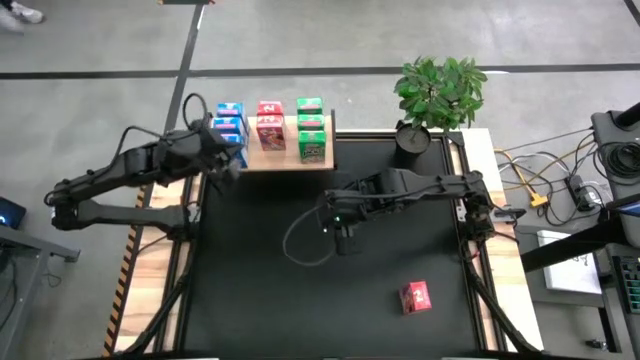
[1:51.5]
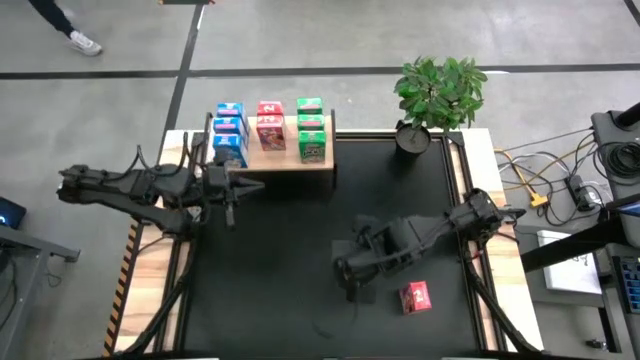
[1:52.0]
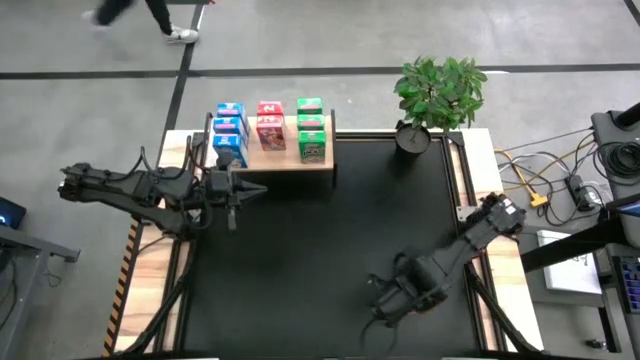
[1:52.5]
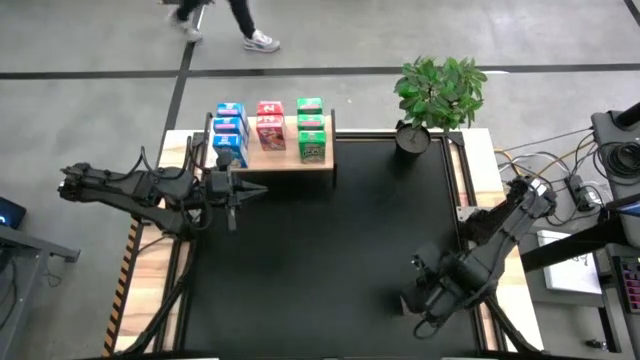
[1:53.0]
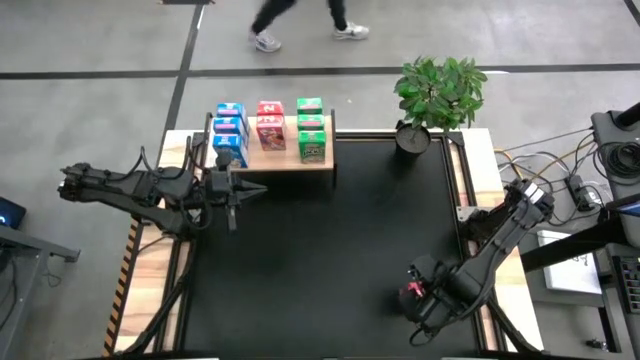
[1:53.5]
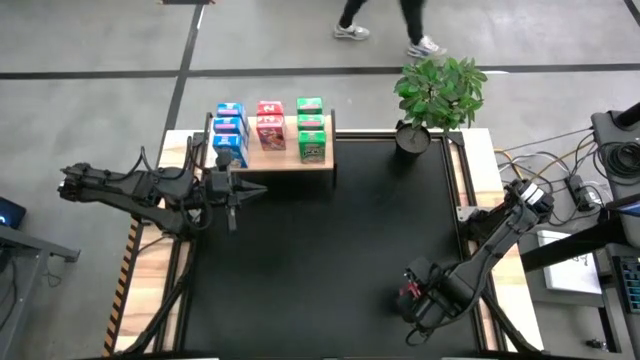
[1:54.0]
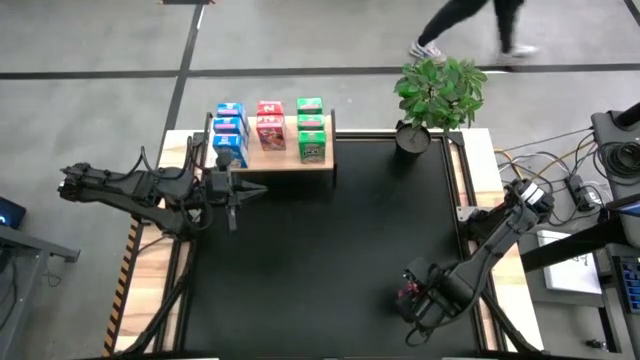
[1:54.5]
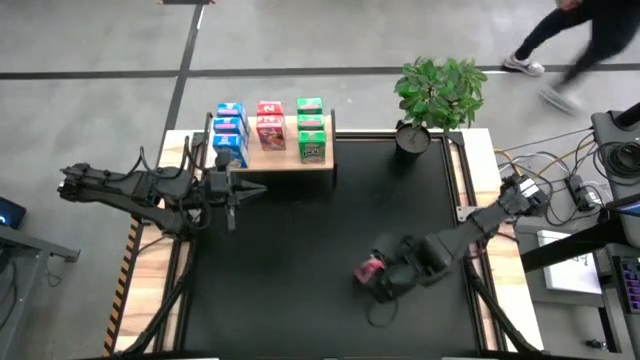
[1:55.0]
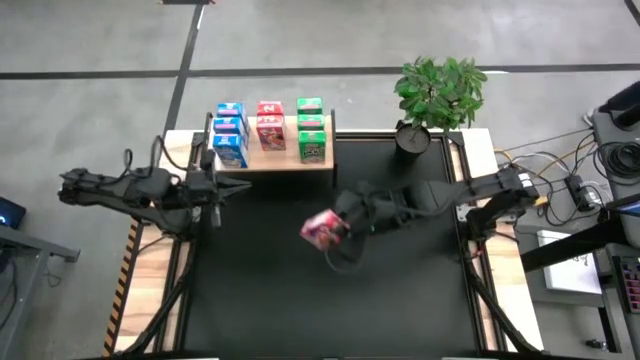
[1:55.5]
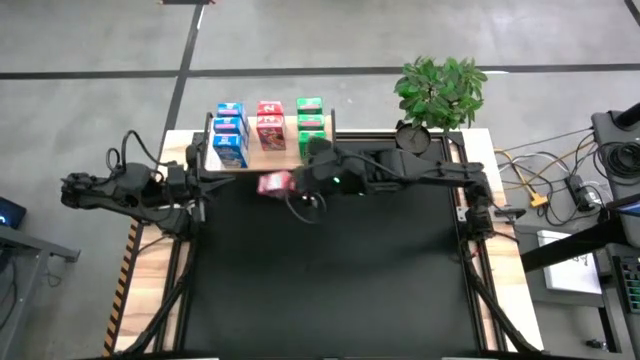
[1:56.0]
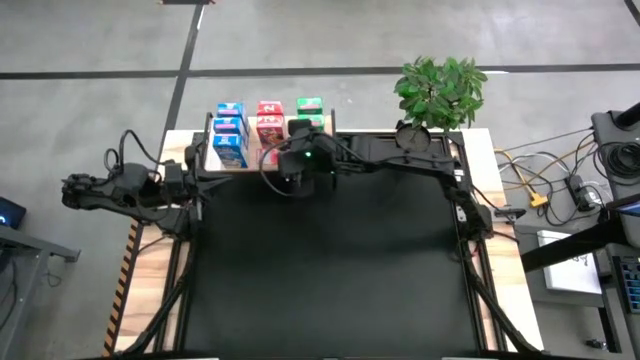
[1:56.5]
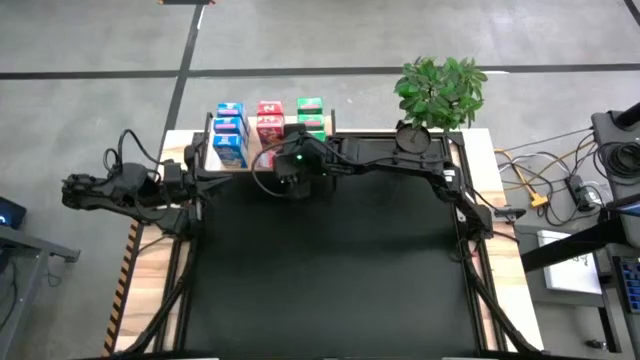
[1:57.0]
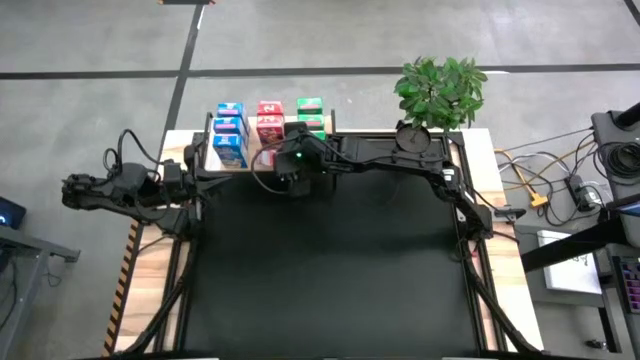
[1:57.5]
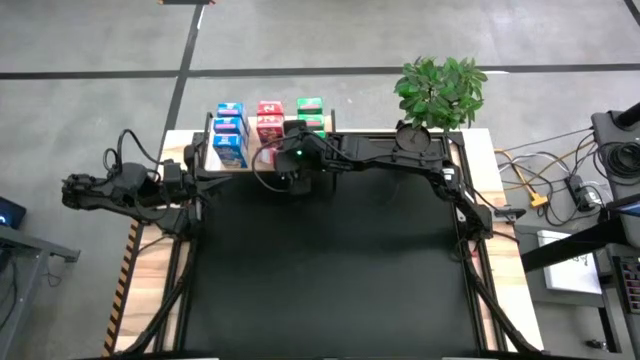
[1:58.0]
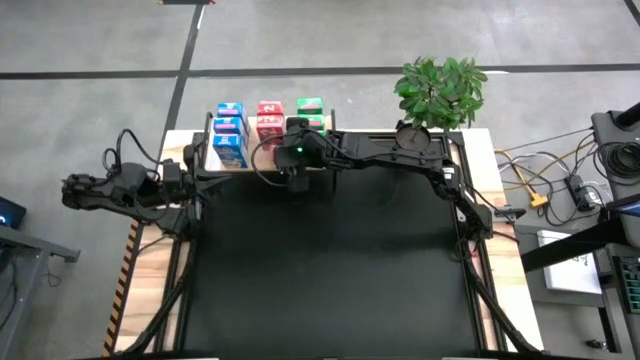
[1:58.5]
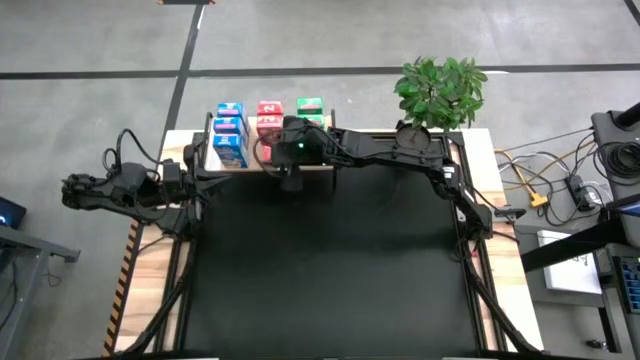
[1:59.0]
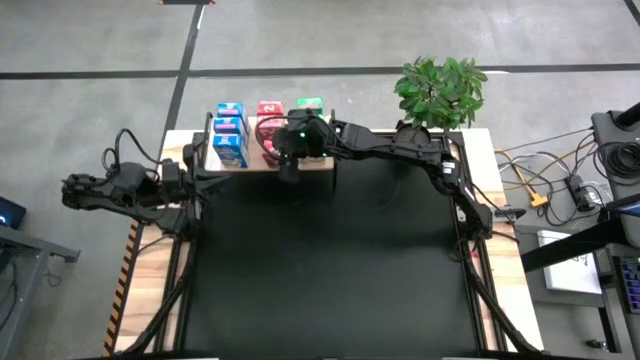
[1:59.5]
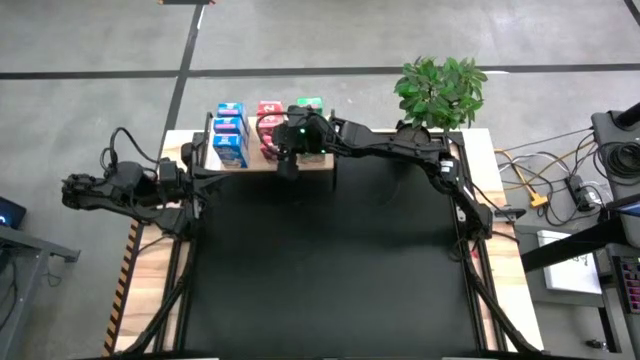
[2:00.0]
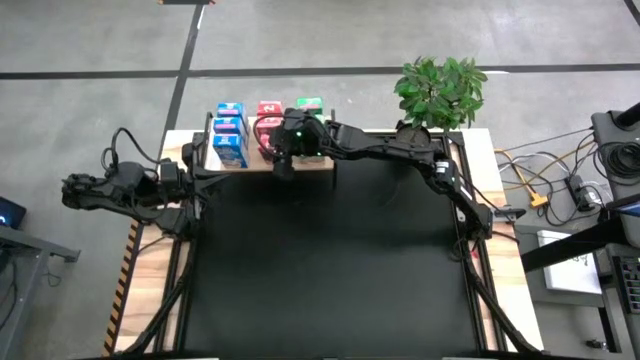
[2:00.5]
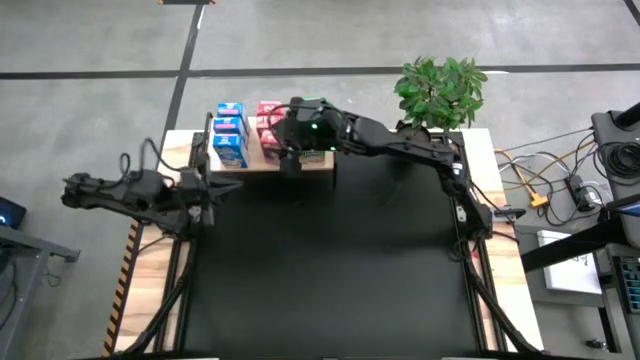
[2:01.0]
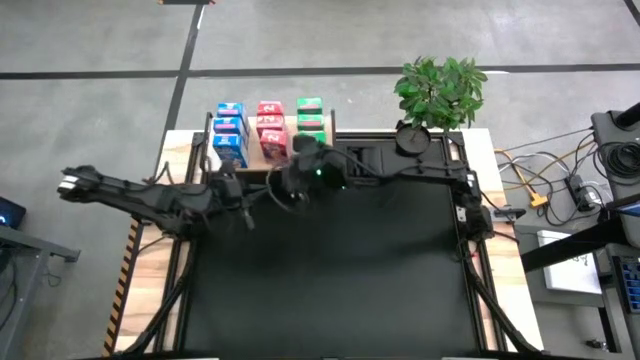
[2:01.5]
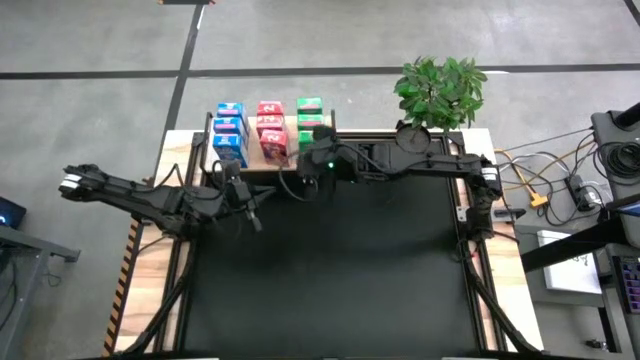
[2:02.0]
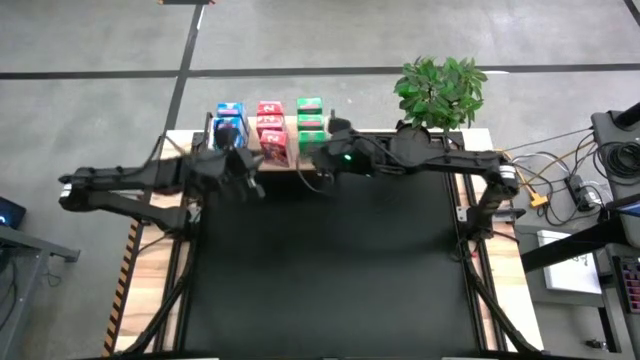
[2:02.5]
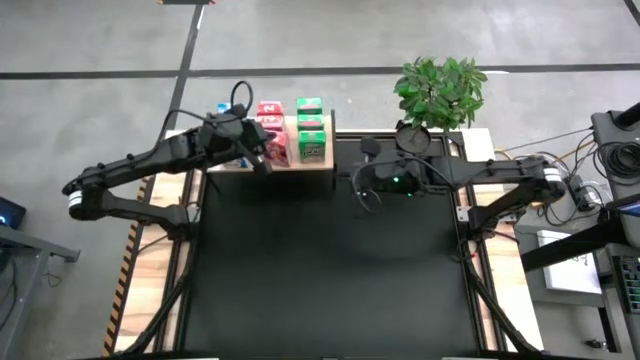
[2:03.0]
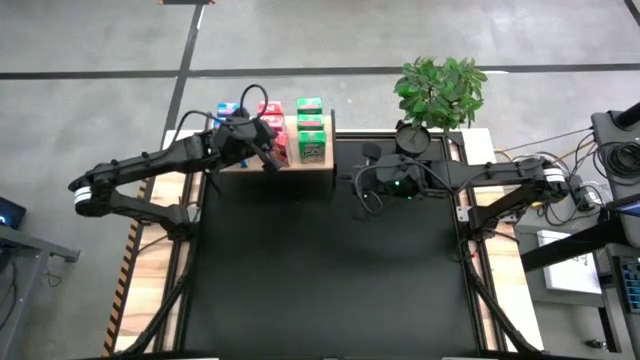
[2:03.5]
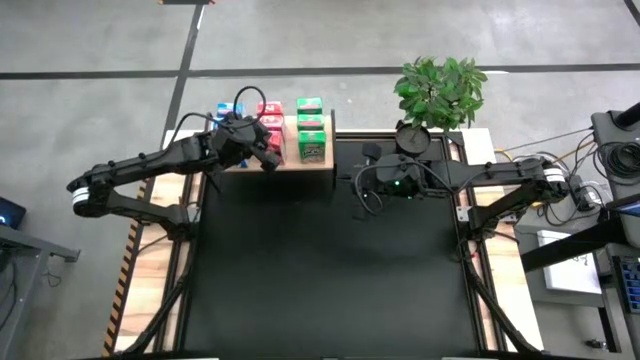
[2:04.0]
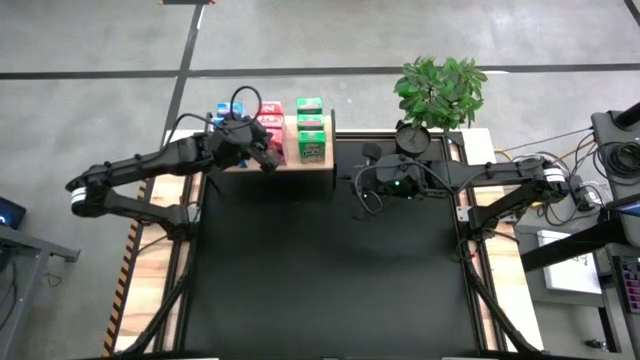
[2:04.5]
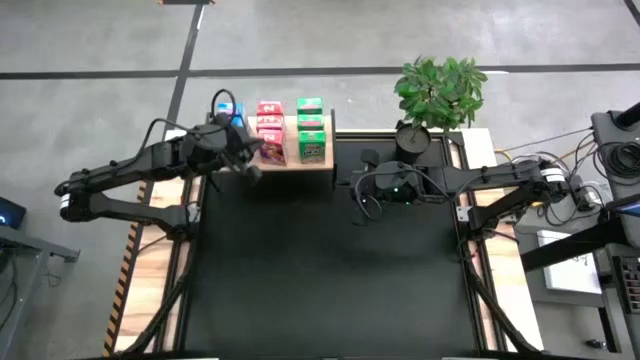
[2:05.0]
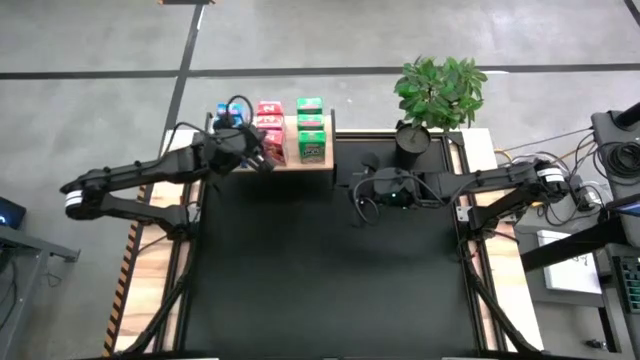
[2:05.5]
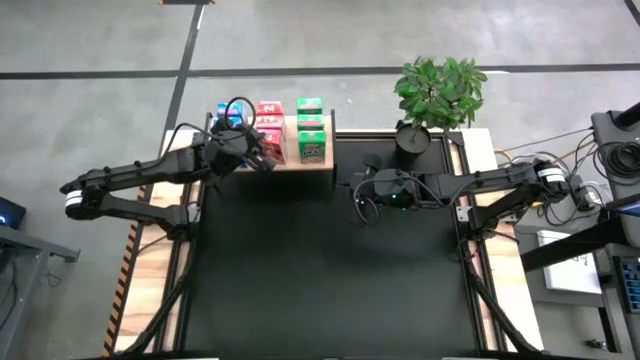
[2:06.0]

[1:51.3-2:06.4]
Task: Stack cereal on shelf
Put the red cereal box on the shelf aligned with the other red cereal boxes

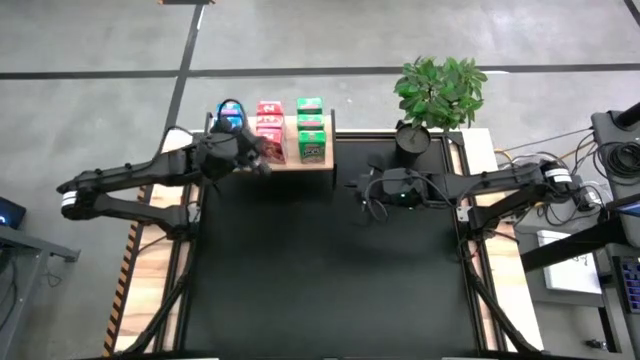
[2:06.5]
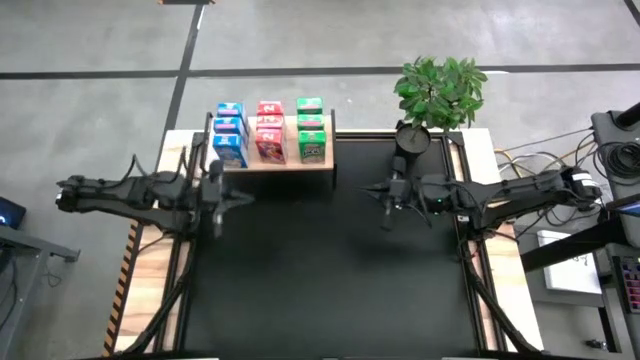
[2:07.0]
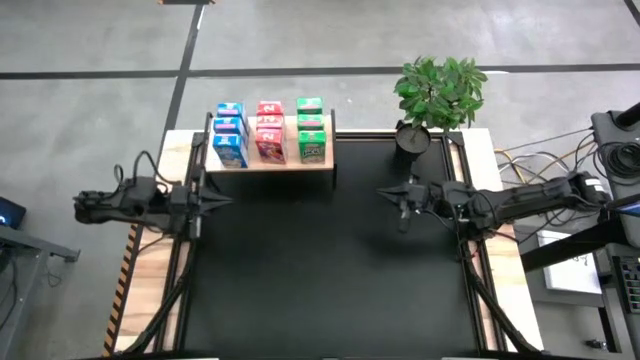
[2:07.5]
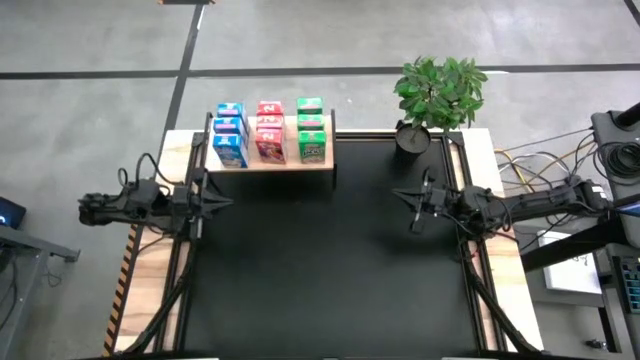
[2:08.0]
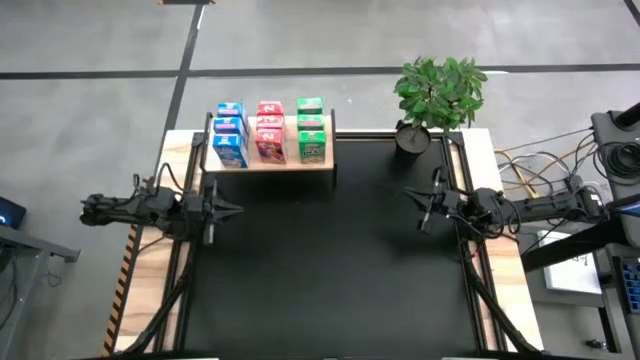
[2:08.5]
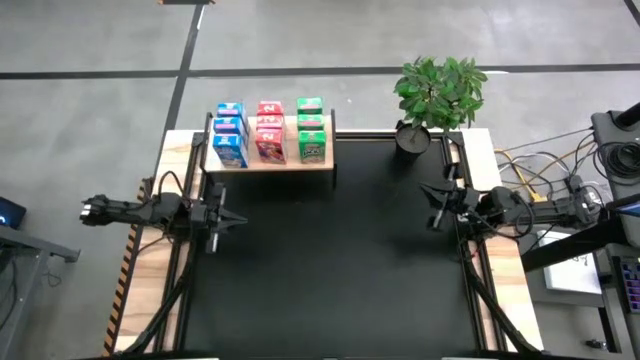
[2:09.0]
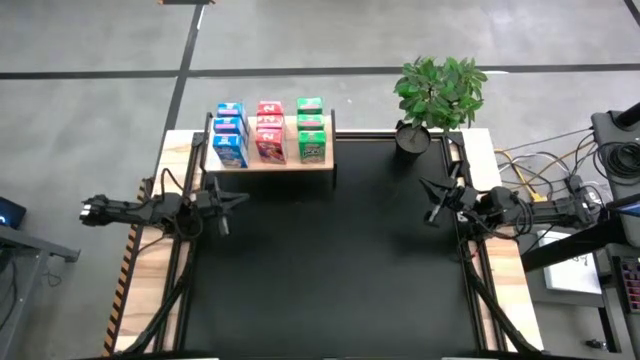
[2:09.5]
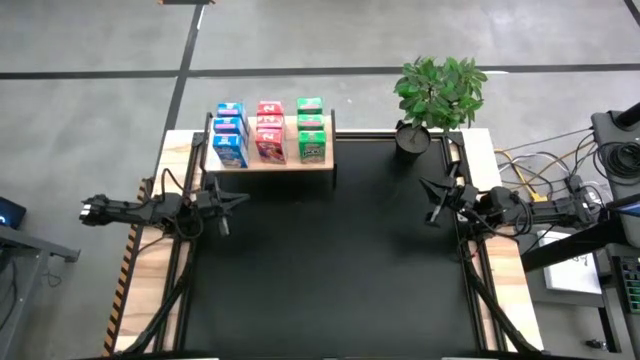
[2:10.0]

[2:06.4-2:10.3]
Return to Home position
